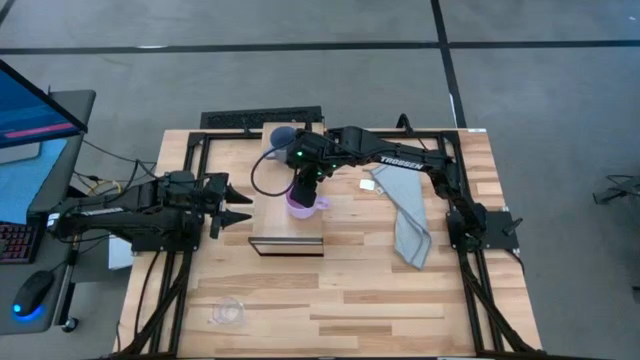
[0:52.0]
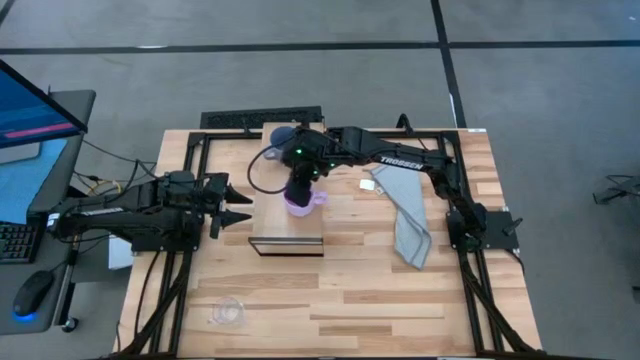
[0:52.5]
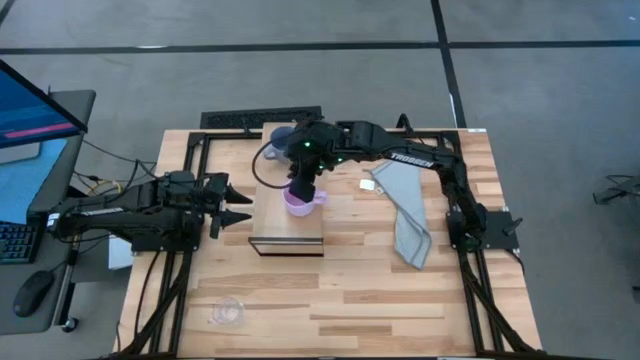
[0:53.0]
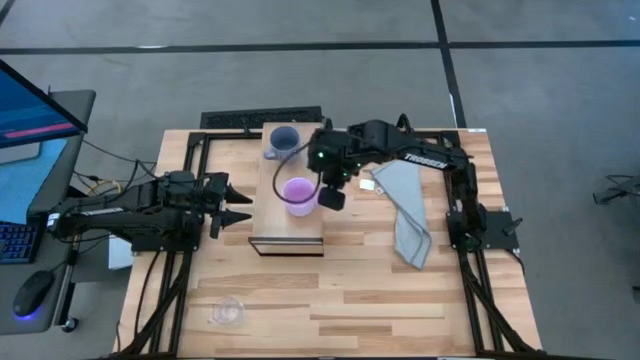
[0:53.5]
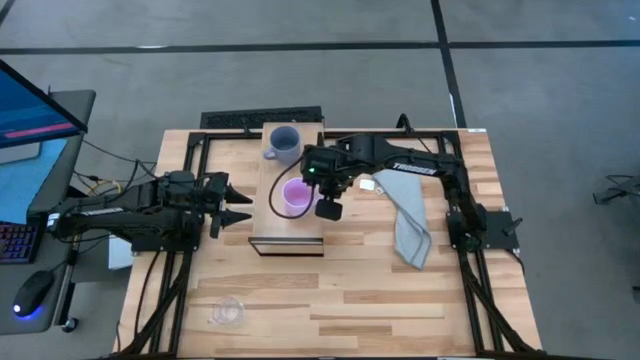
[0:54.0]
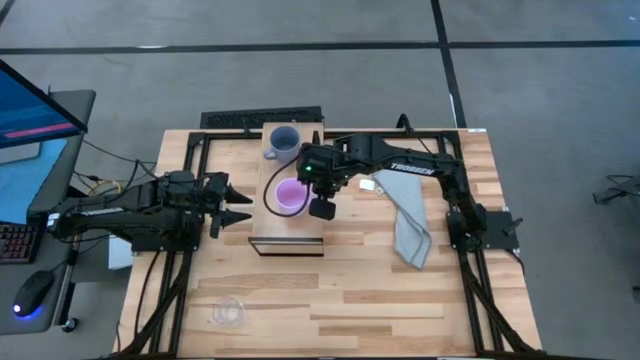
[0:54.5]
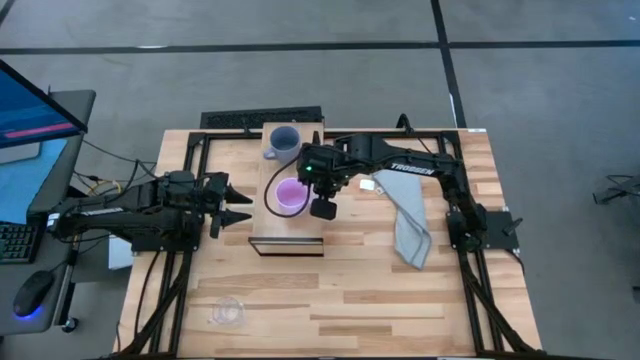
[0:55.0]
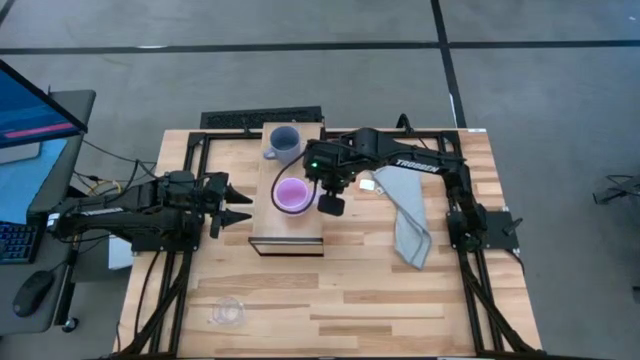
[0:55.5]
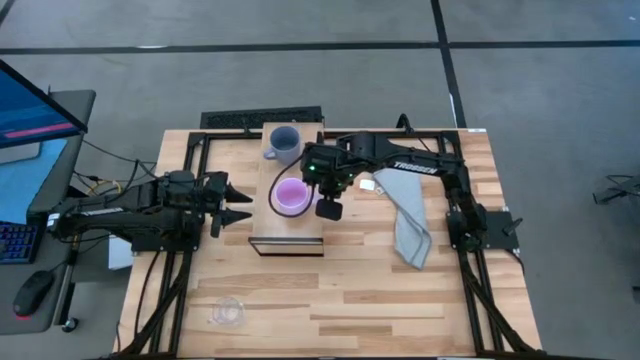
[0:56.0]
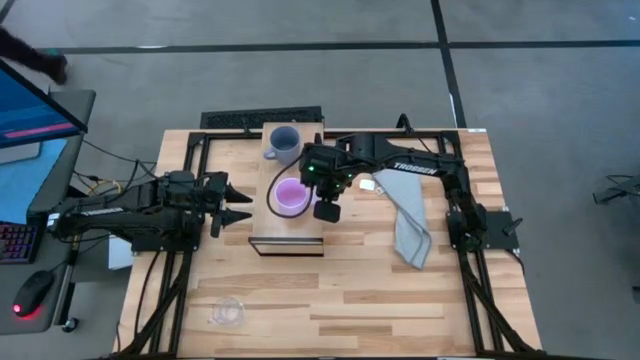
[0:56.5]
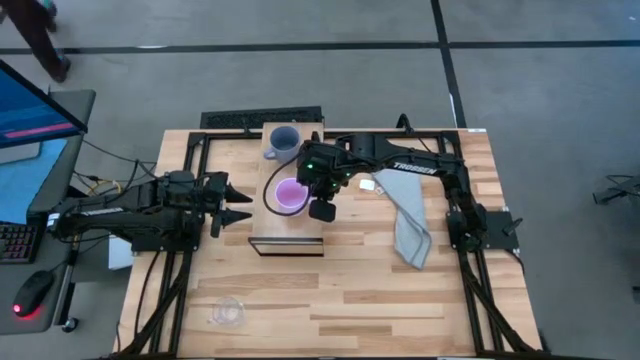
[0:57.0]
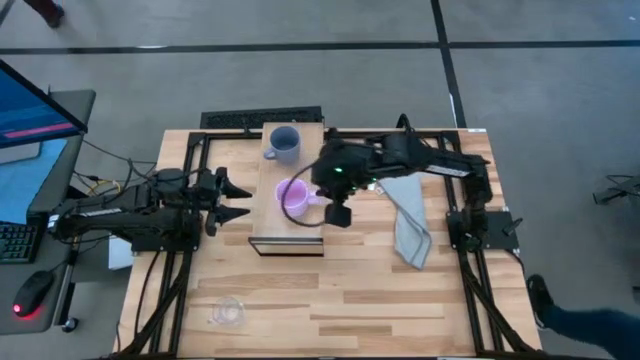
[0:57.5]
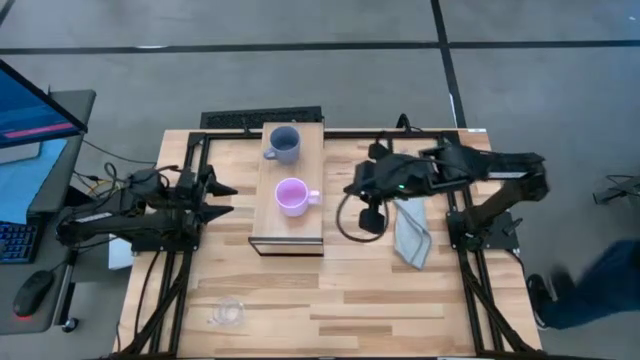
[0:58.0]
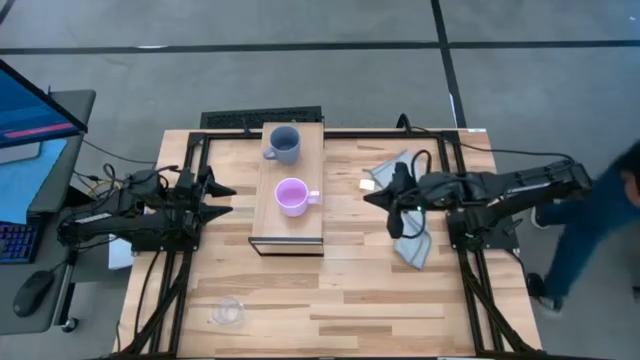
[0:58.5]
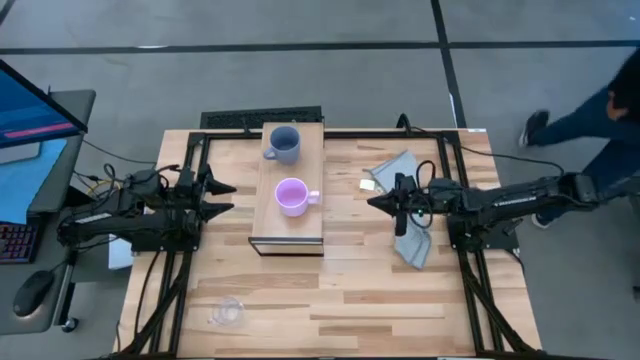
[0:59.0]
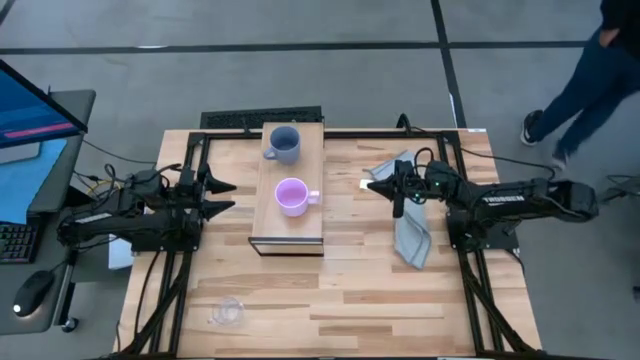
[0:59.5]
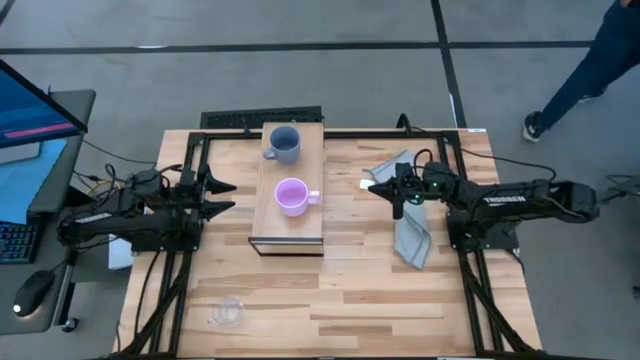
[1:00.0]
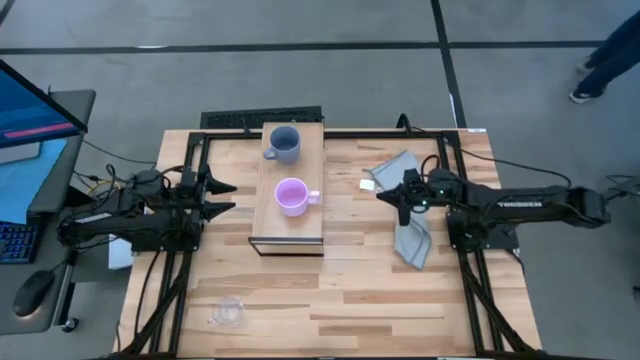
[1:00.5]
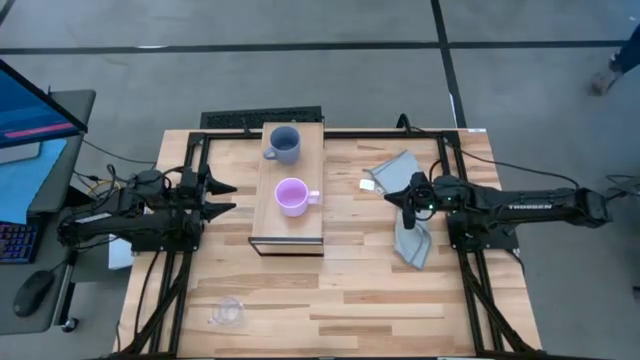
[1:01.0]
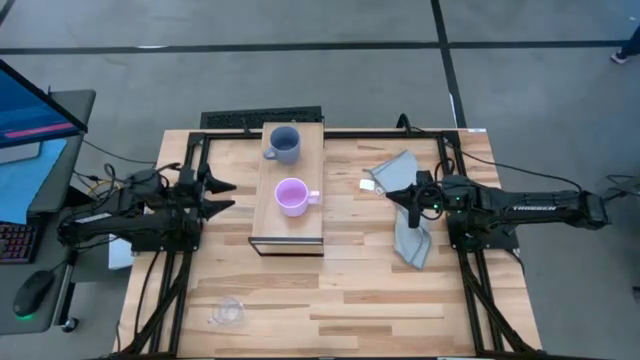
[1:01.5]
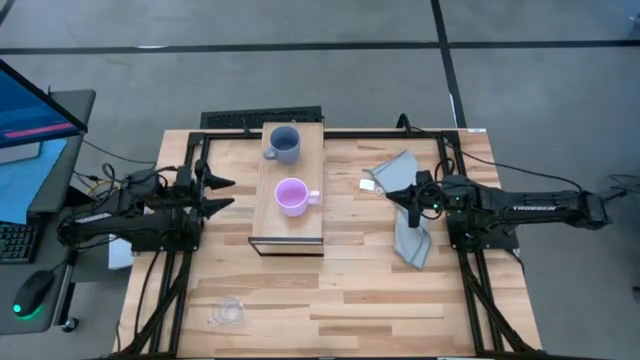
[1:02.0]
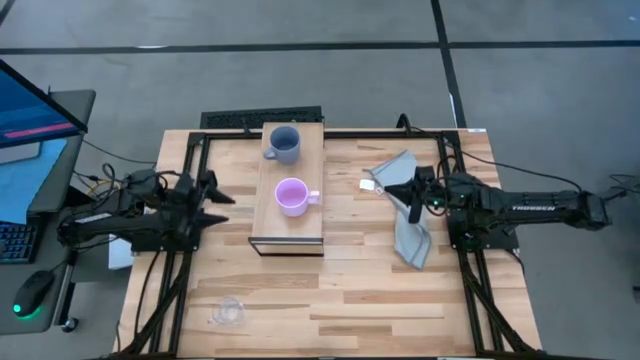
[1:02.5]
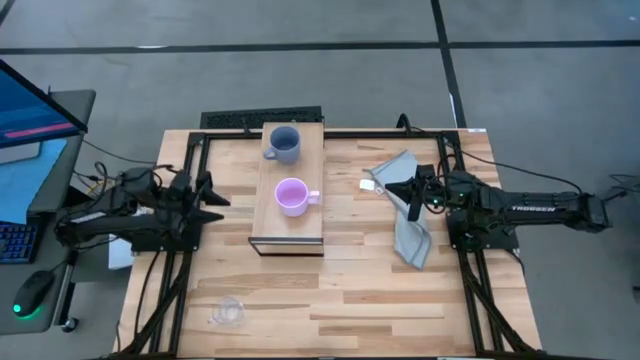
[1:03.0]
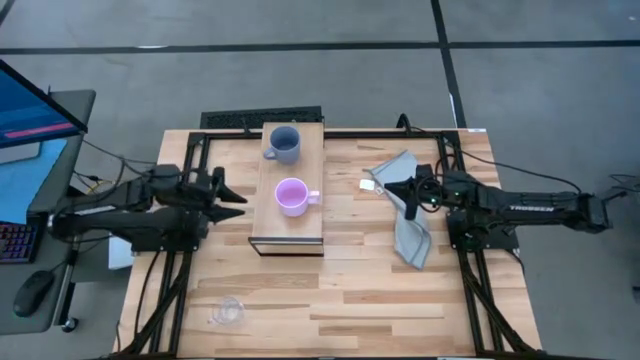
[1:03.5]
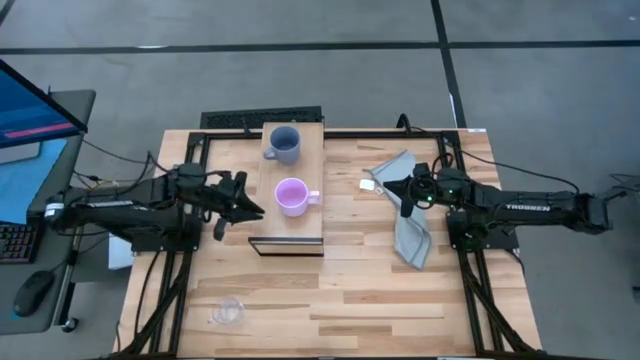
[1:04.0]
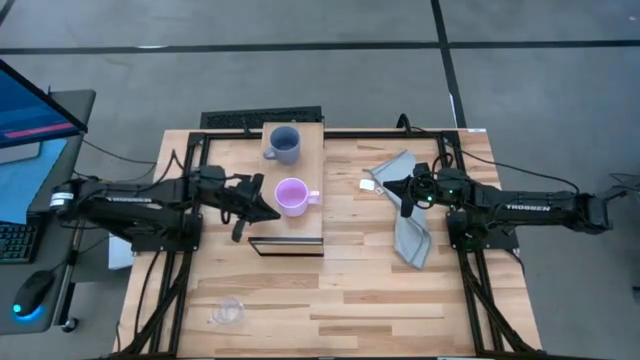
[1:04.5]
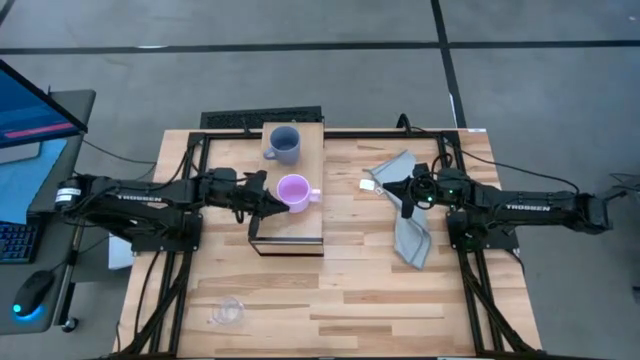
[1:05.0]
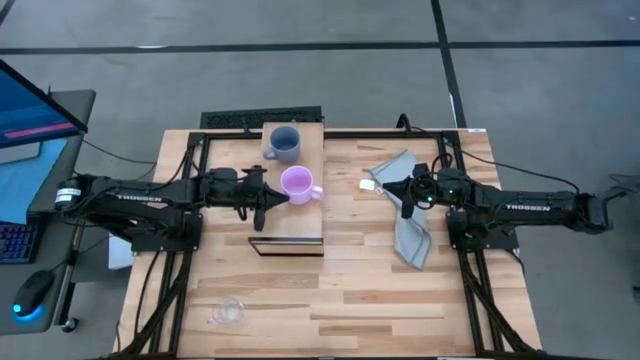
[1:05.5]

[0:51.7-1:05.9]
Task: Stack small to large cups/mugs on shelf
Put the pink mug on the shelf

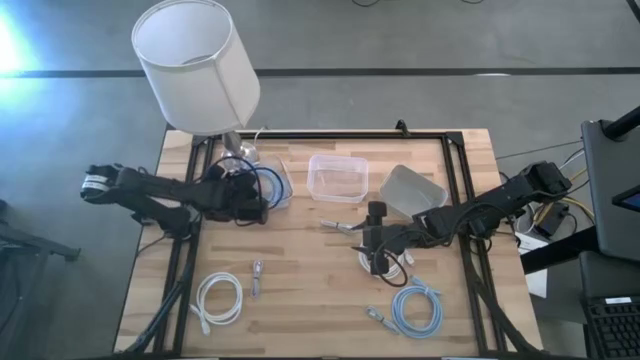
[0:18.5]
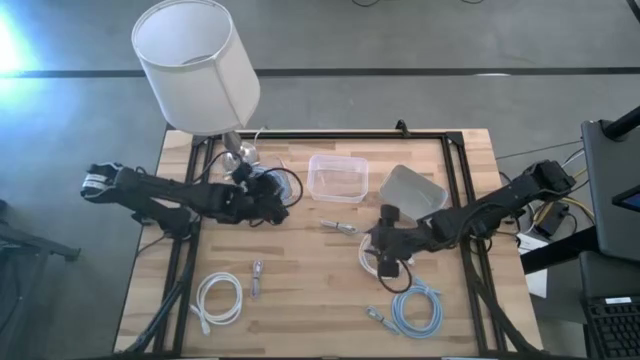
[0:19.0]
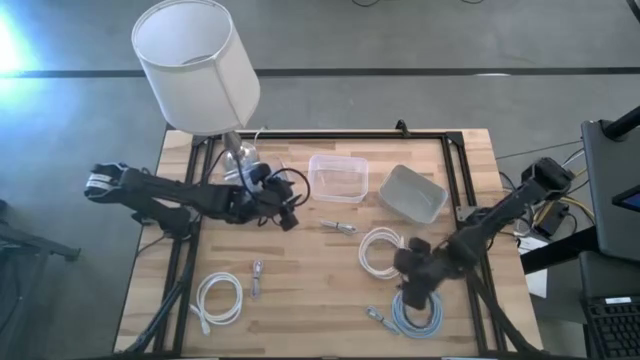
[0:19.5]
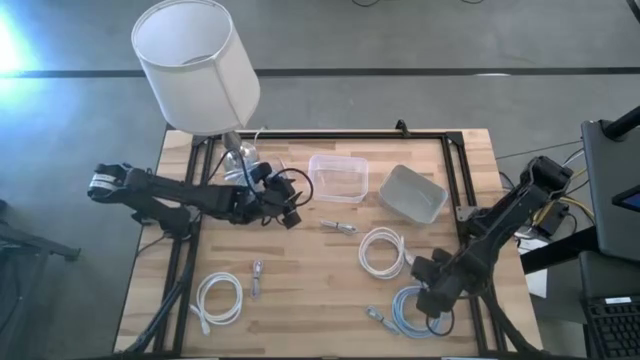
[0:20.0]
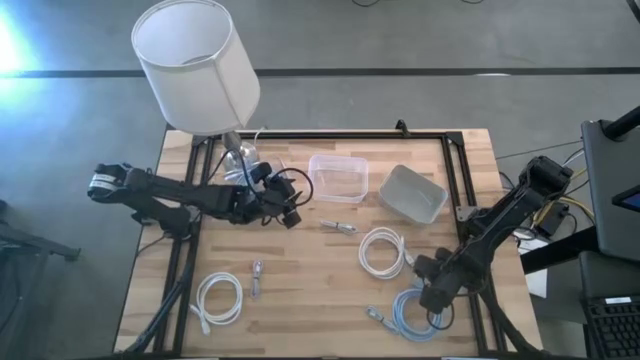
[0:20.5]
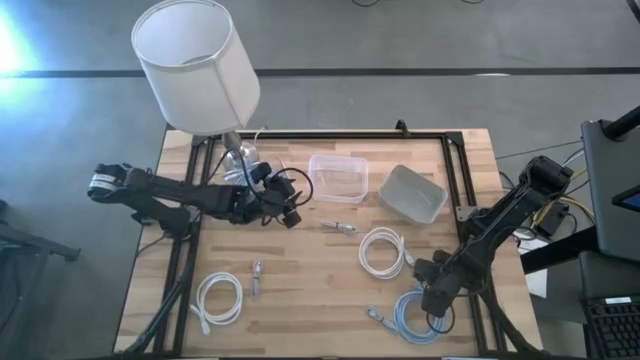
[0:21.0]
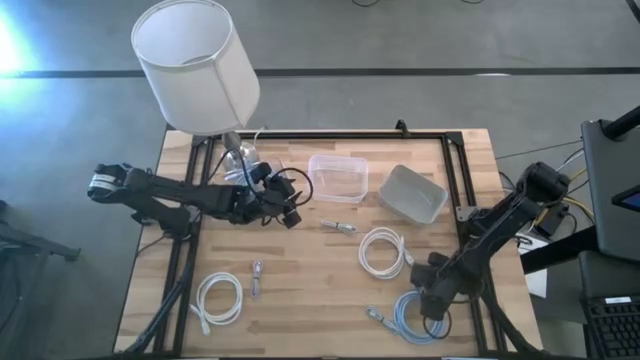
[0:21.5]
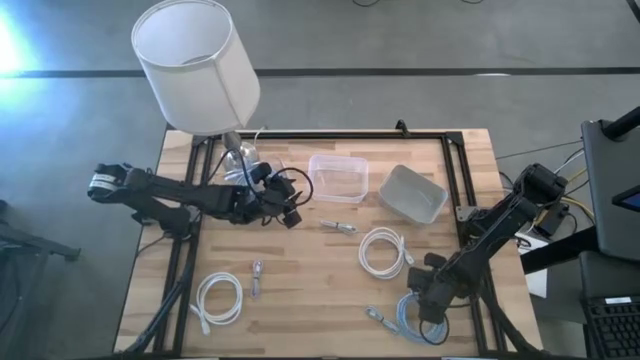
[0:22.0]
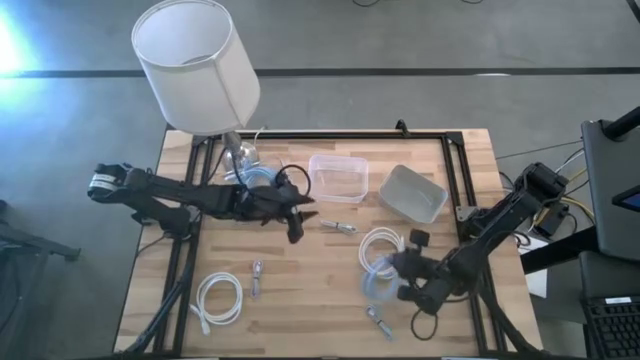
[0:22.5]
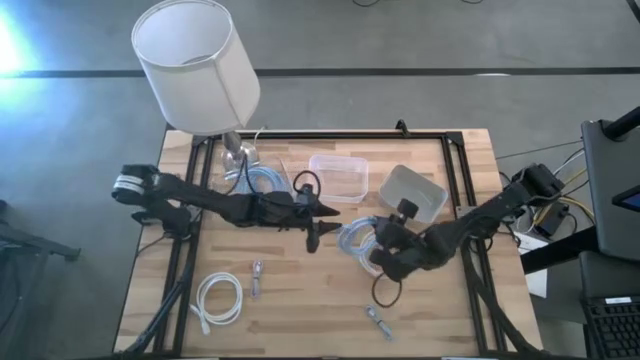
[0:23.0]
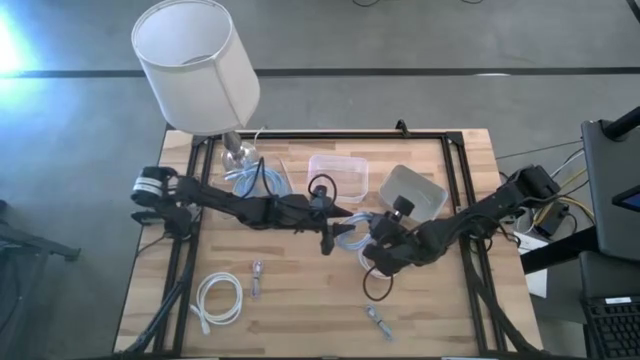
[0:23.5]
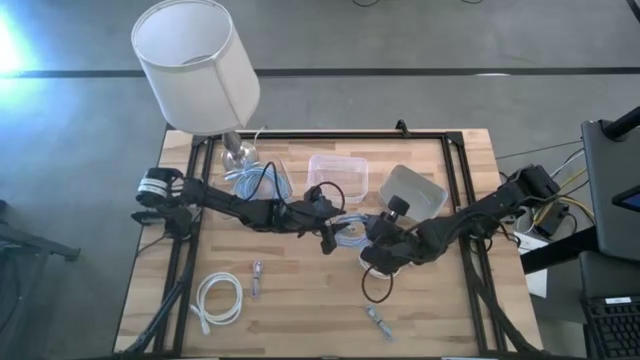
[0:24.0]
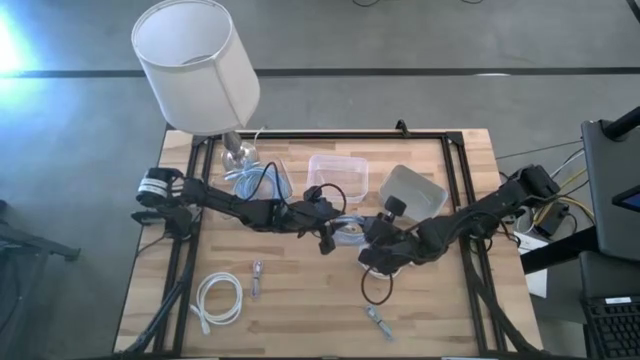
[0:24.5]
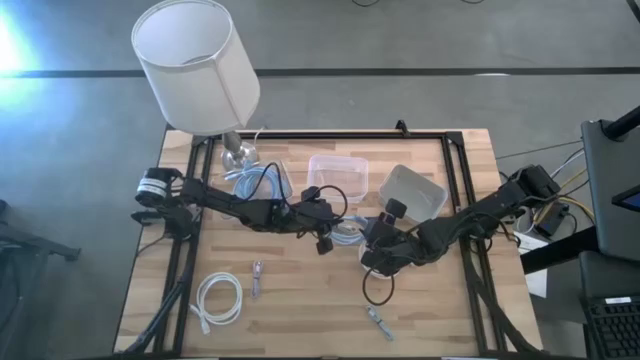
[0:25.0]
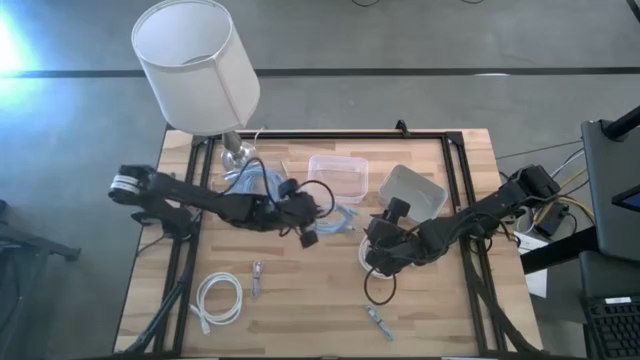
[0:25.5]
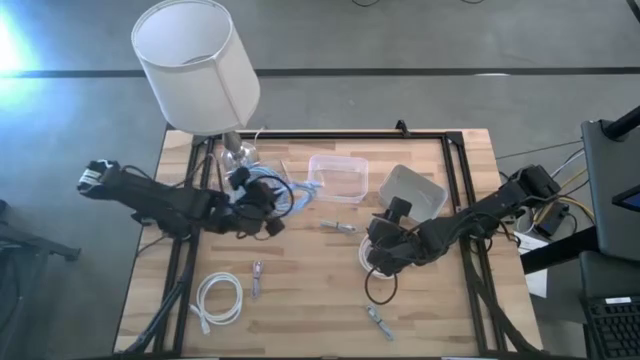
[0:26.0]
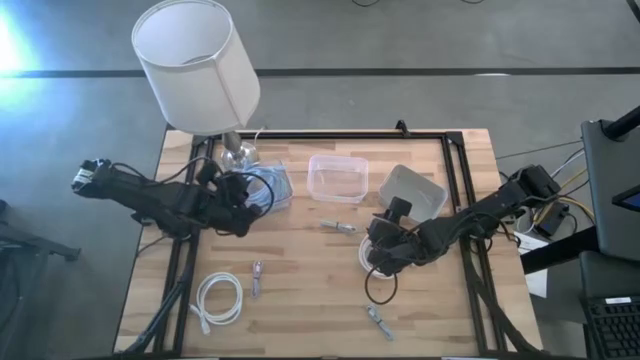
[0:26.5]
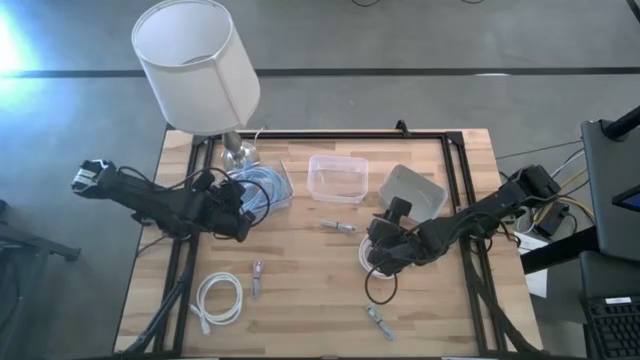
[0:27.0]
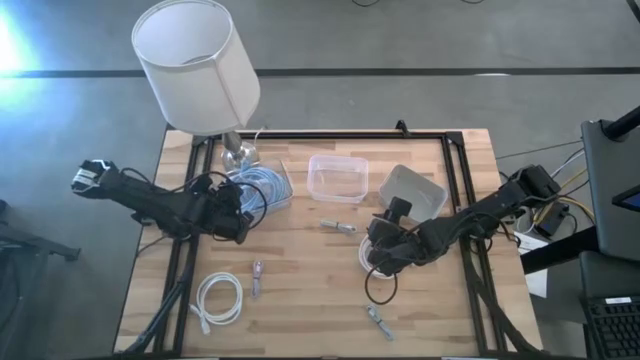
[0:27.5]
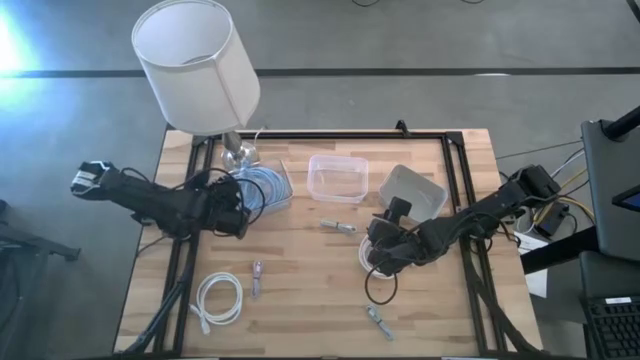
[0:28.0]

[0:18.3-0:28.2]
Task: Pick & Place USB Port
Put the blue HDMI cable into the left transparent bin
